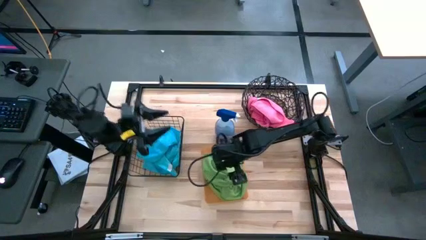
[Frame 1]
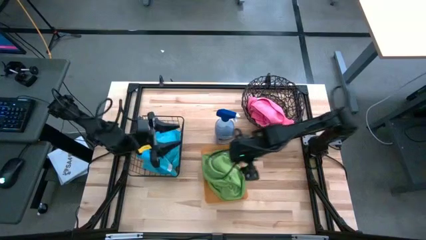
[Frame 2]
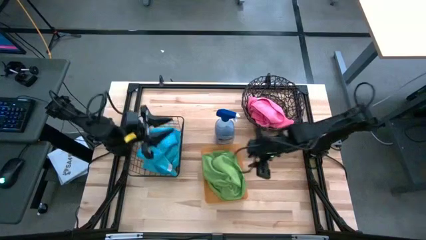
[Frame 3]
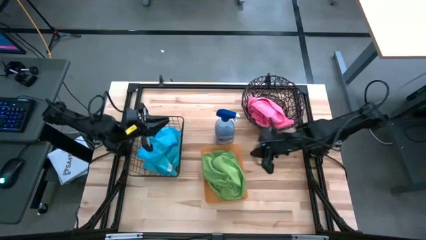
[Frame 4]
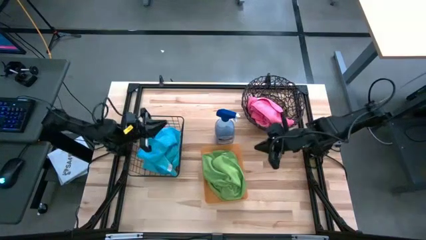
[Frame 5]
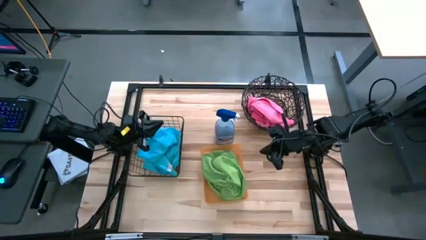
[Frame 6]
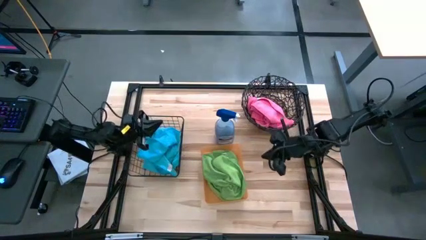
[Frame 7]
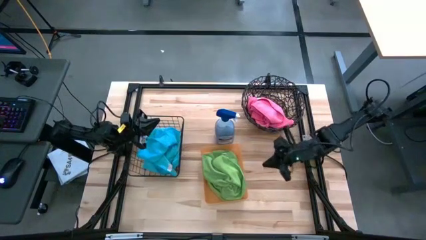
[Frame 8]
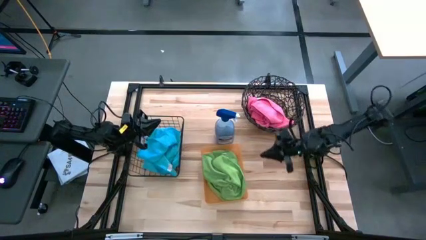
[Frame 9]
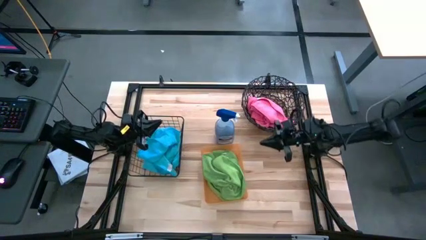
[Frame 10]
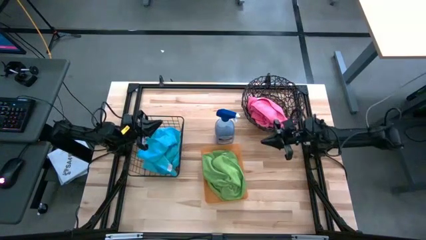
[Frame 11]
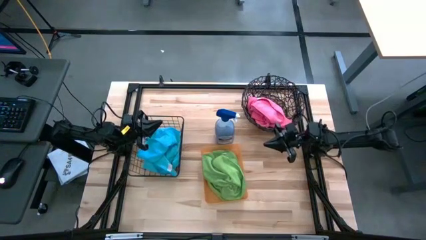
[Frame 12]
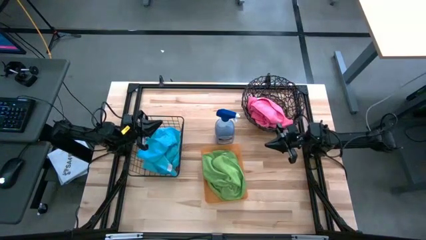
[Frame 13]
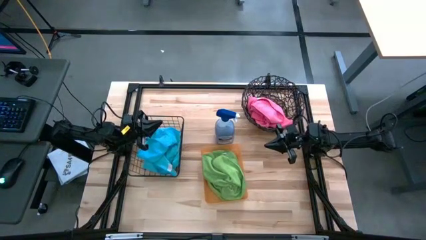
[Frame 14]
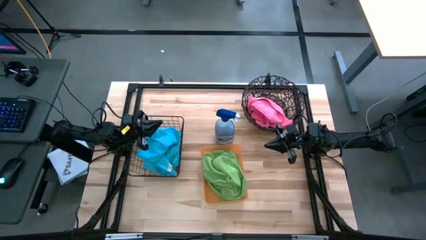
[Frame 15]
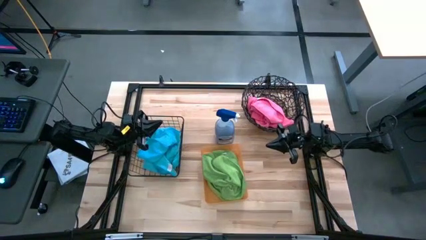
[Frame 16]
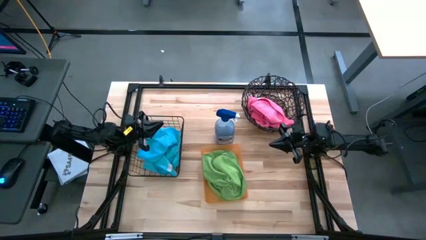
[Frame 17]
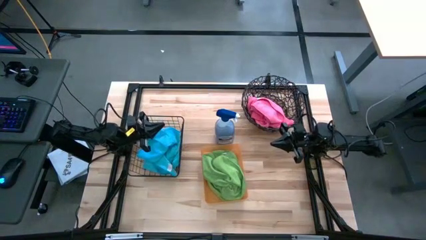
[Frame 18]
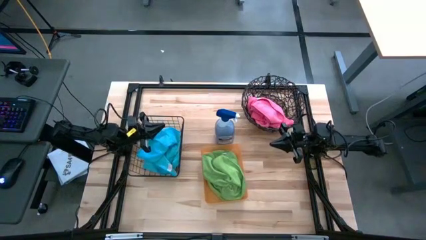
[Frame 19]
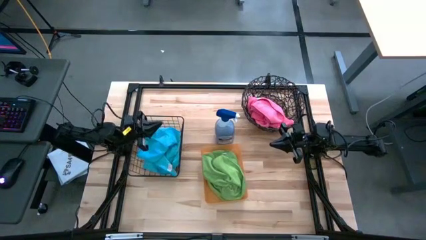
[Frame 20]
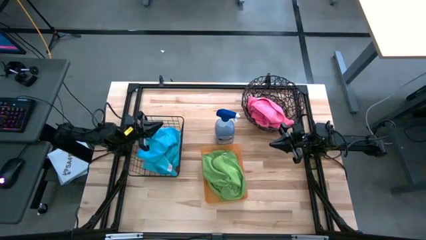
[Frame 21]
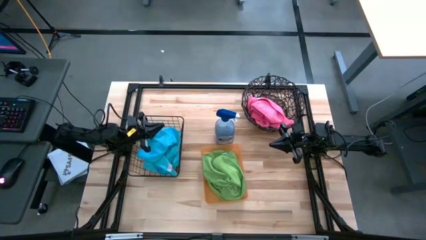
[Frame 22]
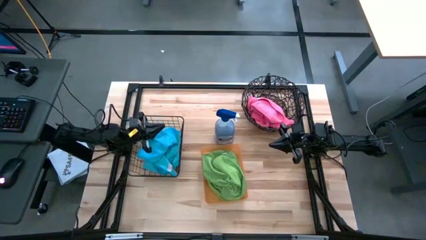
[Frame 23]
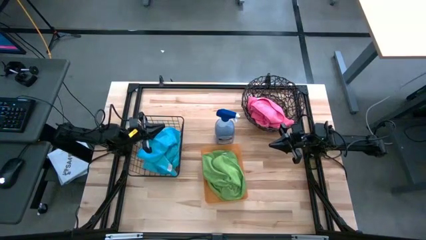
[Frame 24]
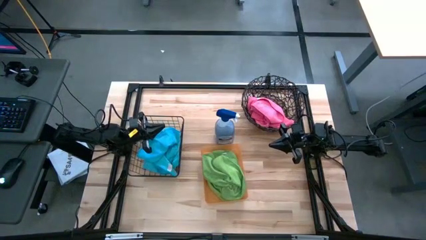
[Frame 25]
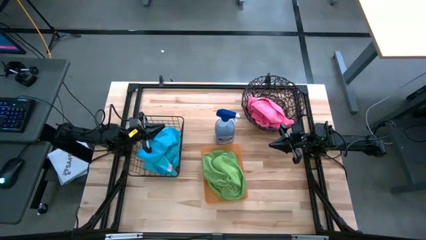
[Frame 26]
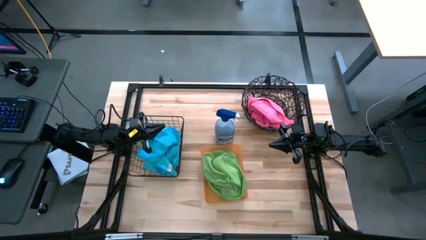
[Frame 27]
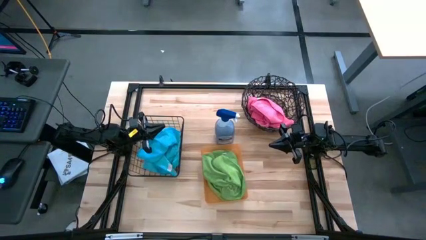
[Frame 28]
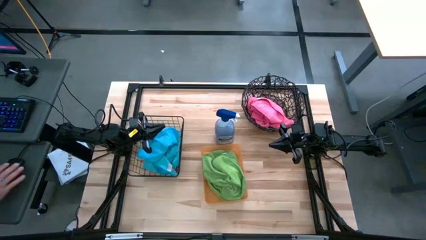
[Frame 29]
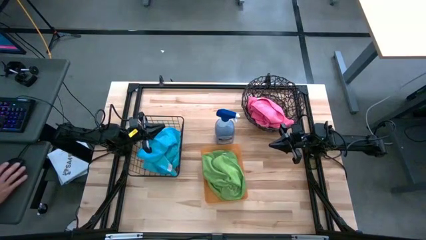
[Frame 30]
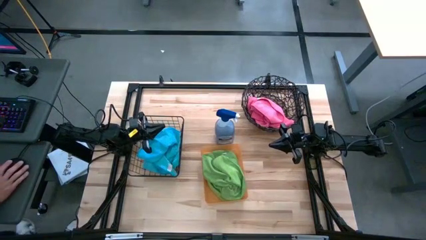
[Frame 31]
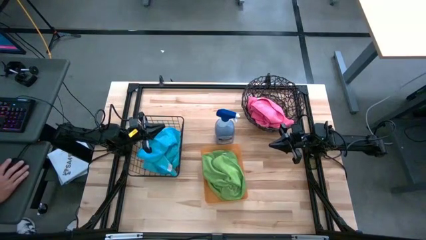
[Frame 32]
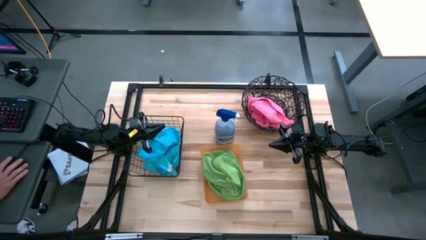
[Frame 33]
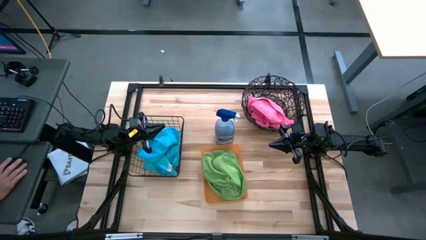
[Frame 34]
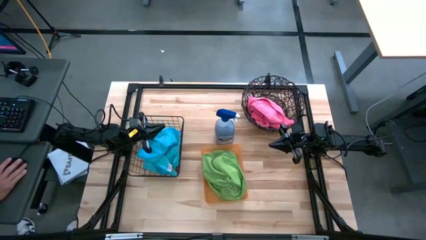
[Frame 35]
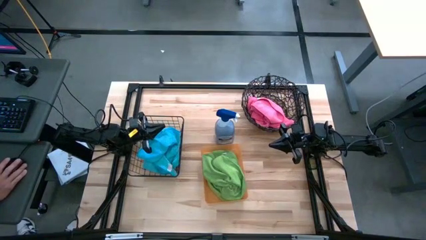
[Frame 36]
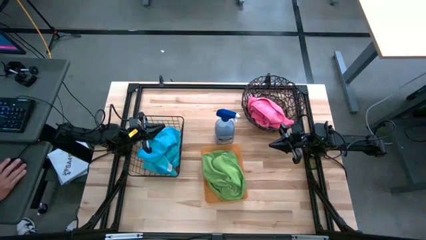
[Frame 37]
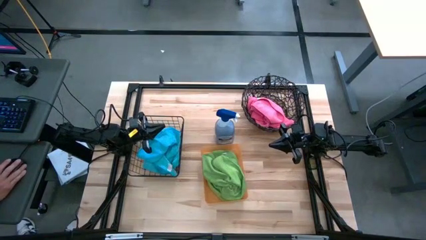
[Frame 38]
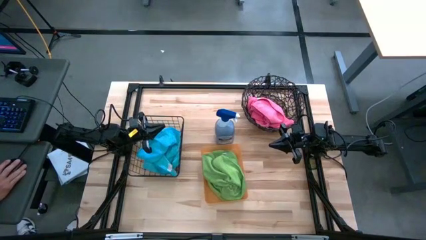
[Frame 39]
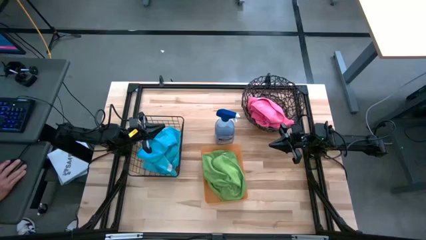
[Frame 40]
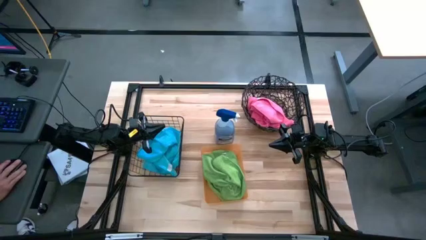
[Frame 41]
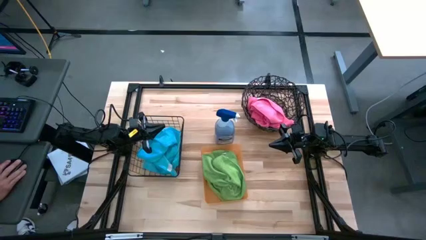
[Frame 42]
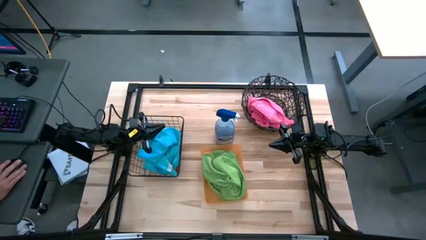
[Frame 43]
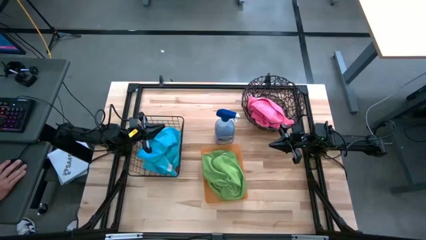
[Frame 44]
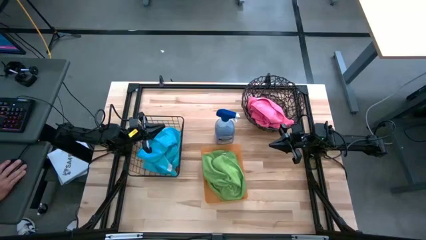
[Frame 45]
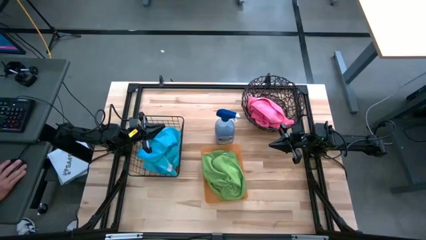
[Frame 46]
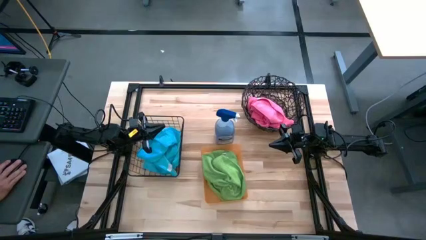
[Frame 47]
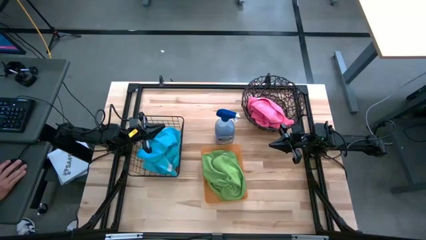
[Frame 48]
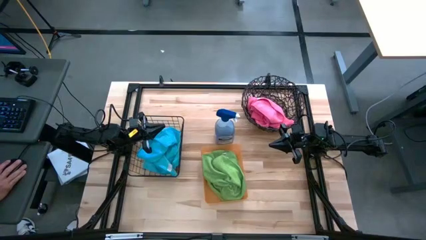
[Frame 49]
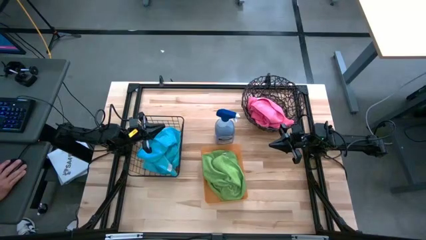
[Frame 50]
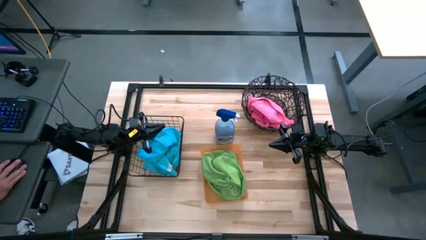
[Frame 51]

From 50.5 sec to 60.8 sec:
Task: Sort microfiber towel by color & place in baskets
Return to Home Position
